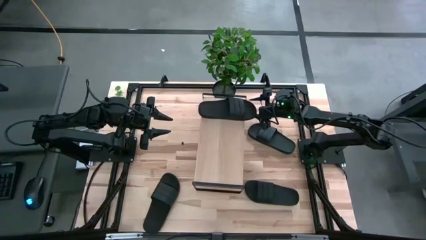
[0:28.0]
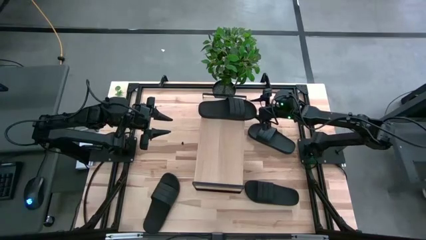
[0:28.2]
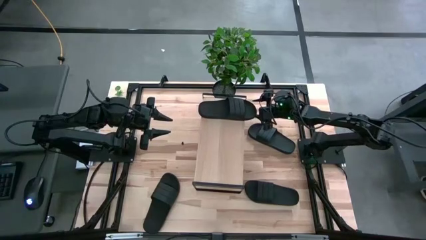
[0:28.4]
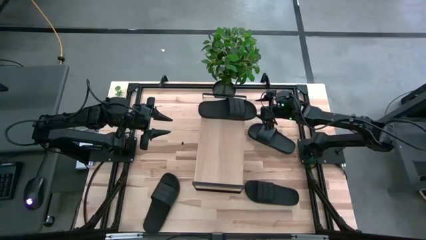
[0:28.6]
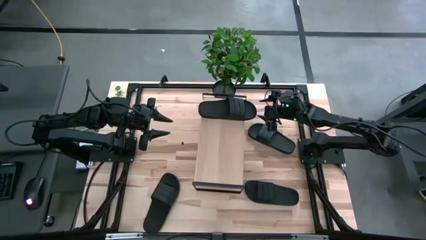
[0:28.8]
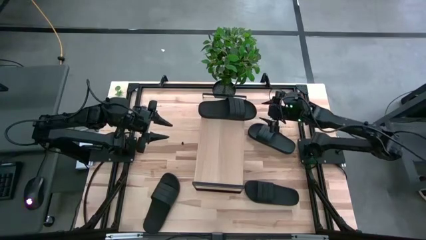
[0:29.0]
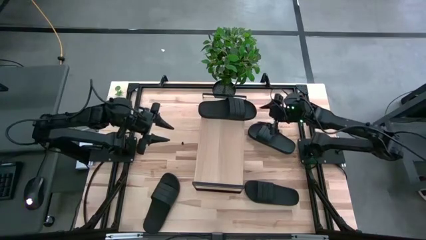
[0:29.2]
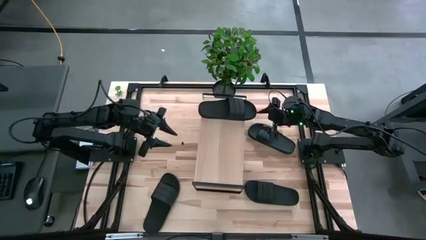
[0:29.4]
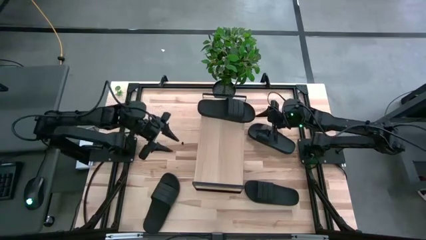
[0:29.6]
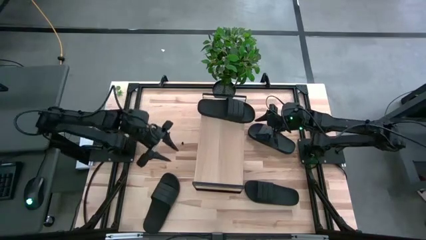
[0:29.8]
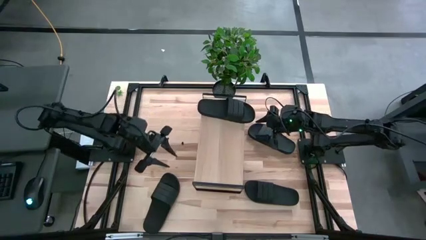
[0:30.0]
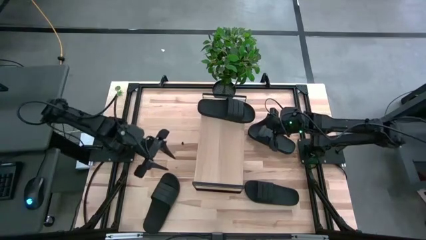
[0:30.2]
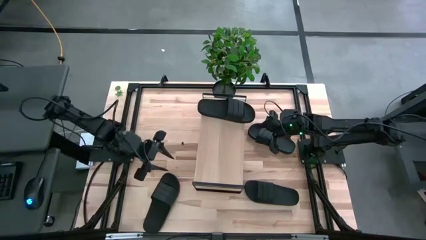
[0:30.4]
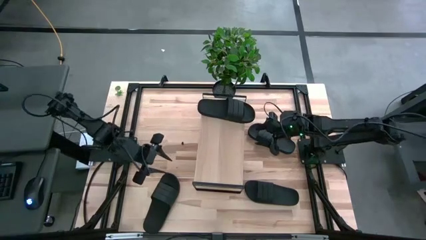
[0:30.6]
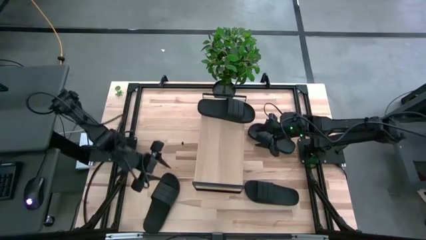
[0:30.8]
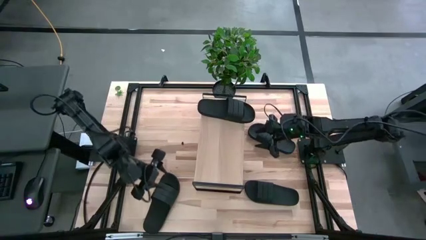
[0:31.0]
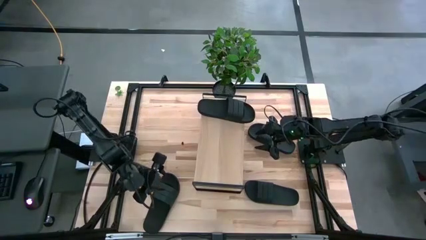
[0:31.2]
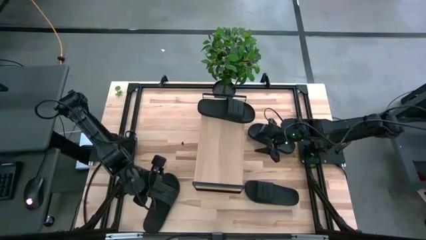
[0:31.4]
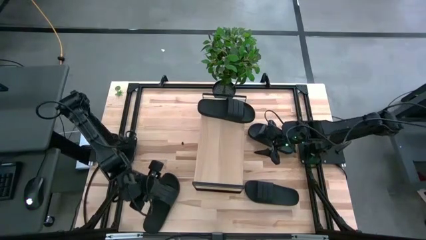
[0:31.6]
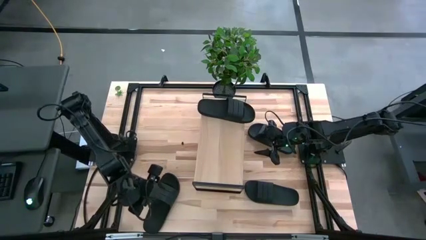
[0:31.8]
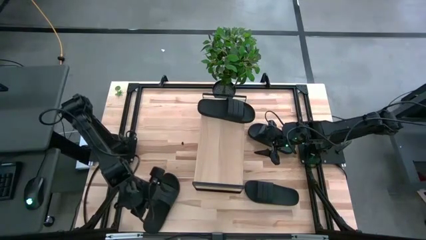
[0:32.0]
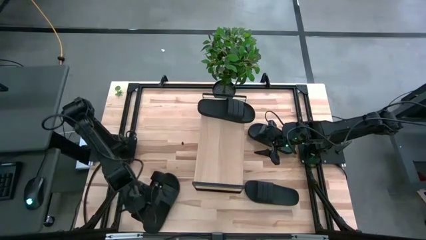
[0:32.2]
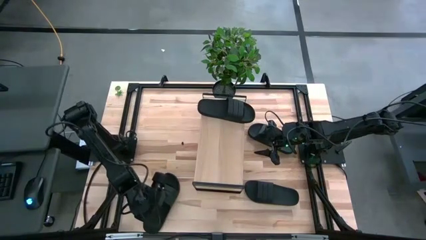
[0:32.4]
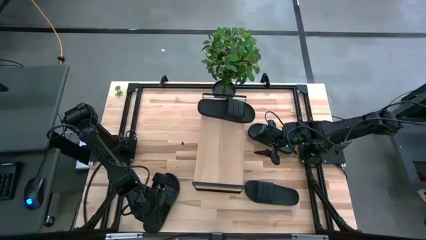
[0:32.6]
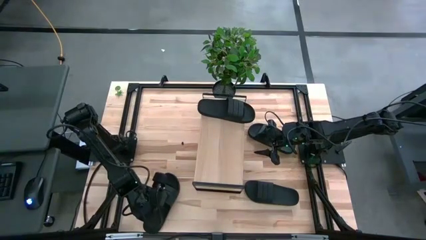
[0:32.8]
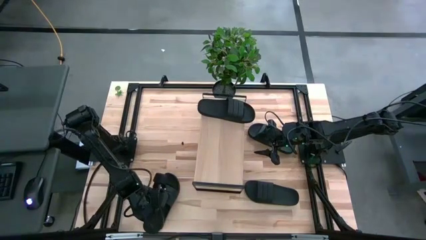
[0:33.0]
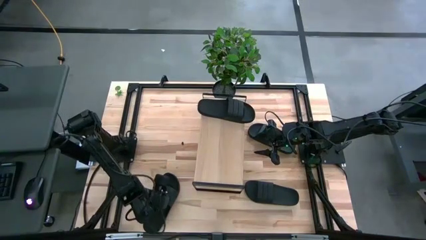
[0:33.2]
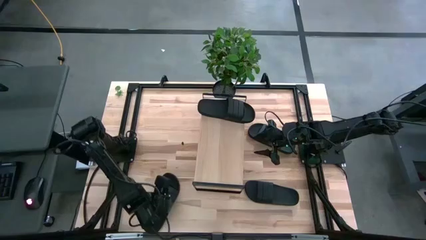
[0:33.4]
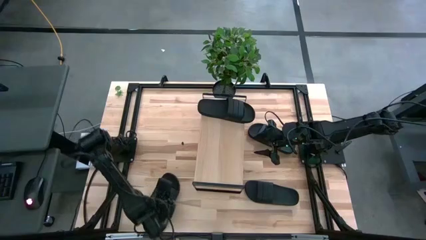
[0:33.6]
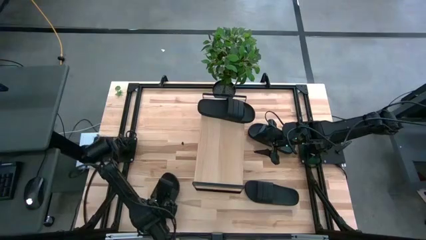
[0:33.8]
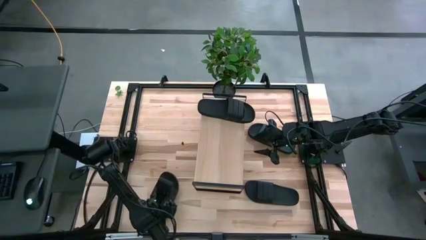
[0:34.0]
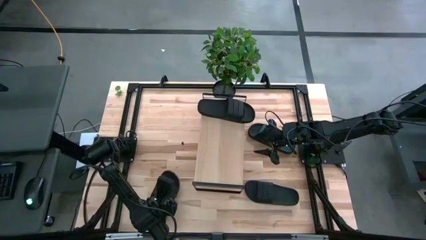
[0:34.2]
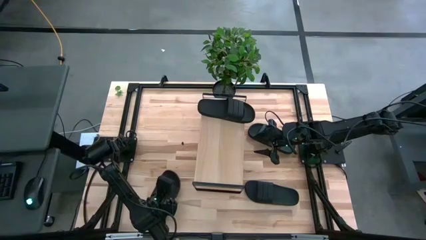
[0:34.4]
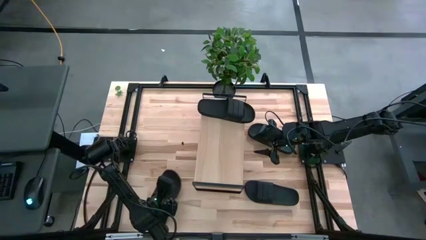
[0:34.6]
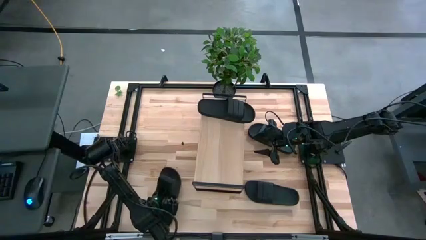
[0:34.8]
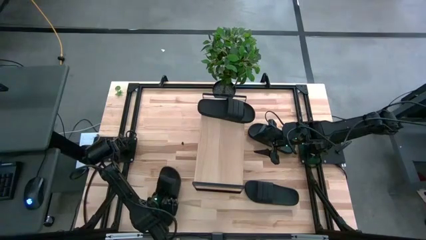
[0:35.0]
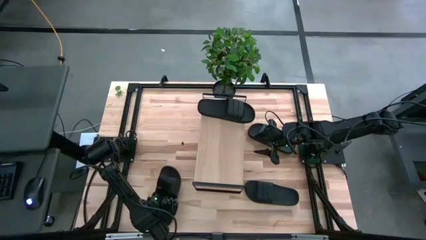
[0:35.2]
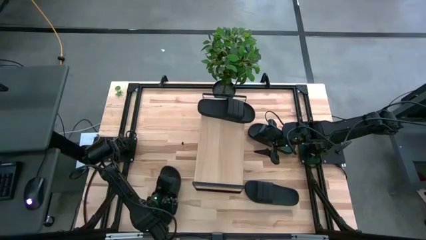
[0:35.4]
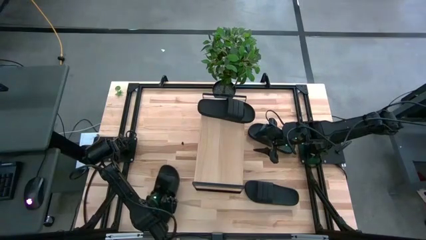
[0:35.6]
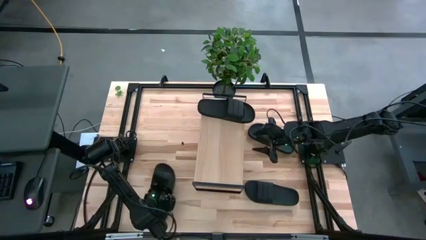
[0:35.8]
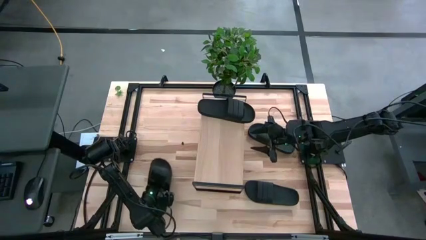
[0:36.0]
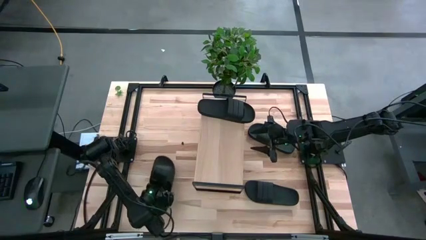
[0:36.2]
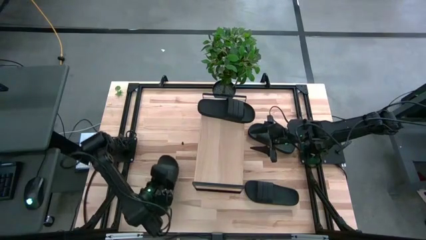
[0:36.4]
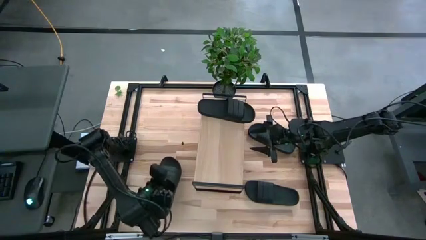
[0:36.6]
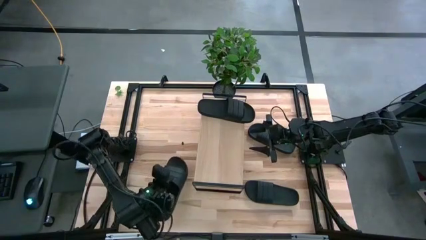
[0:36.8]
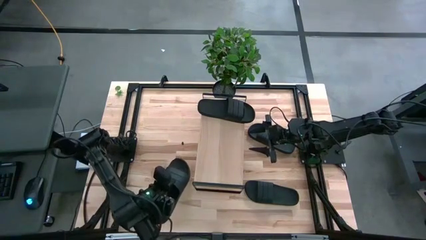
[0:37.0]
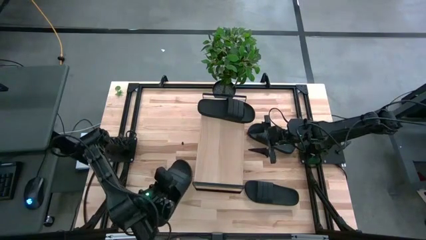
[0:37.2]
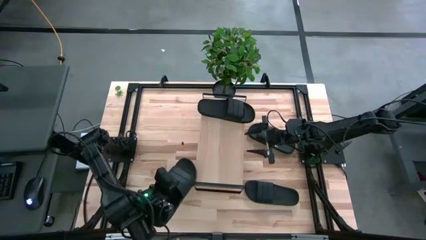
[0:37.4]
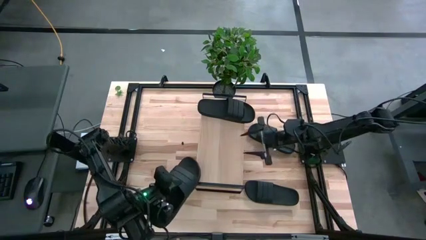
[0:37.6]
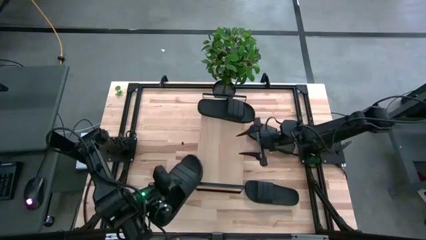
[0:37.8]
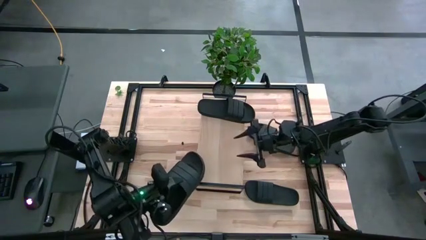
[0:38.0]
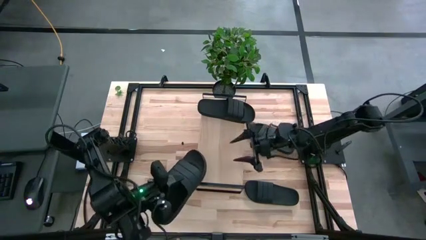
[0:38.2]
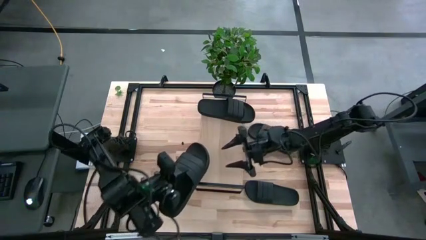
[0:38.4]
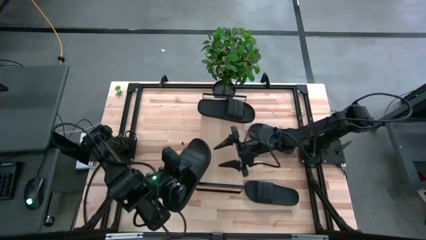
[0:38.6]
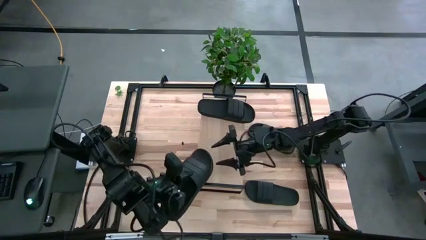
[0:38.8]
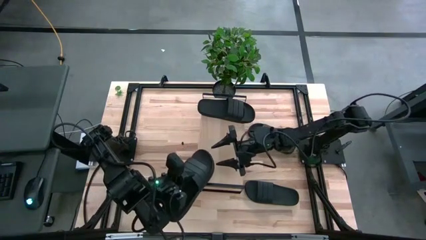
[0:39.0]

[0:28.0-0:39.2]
Task: Pick and place slides into the shelf
Put the bottom left slide on the shelf
